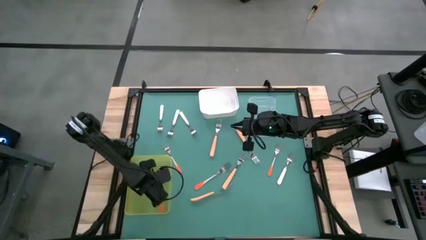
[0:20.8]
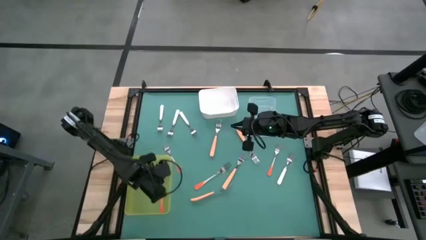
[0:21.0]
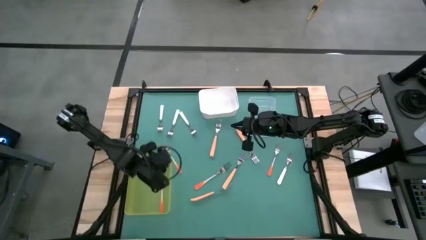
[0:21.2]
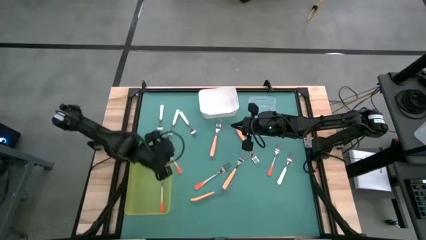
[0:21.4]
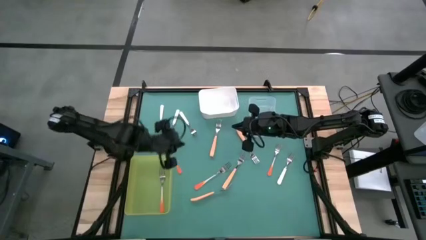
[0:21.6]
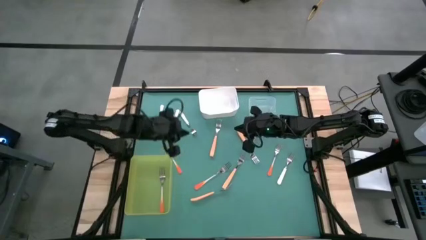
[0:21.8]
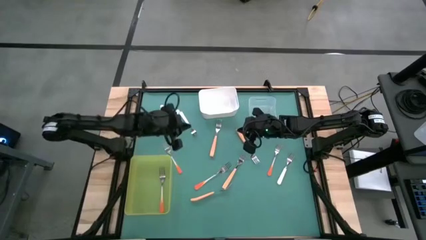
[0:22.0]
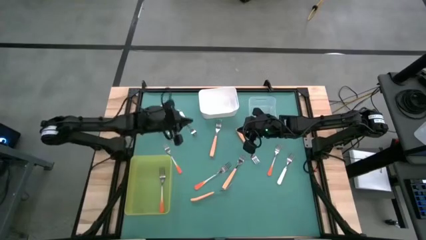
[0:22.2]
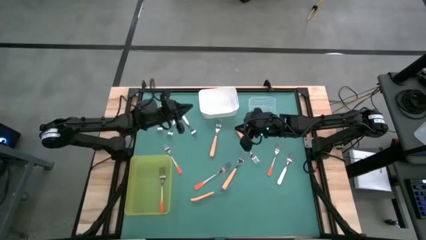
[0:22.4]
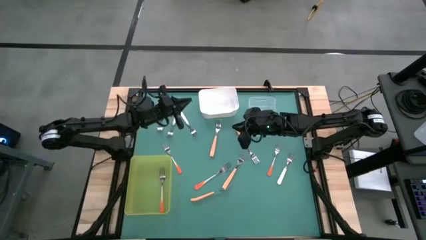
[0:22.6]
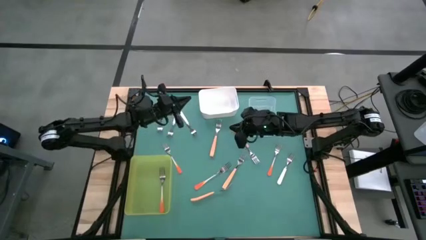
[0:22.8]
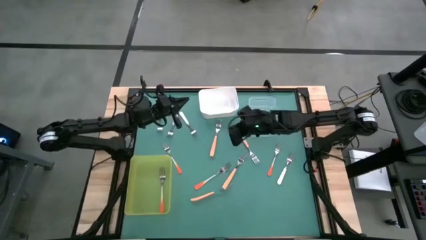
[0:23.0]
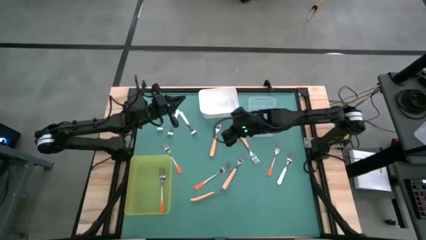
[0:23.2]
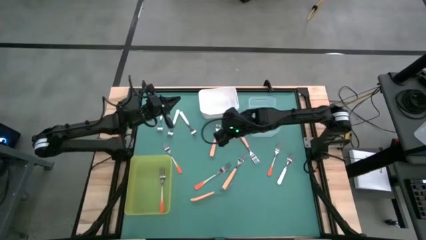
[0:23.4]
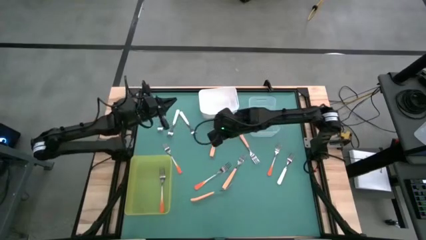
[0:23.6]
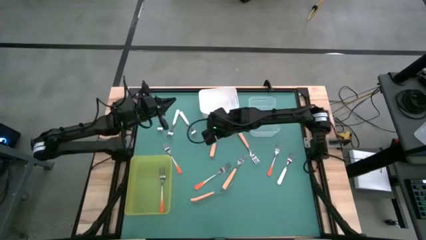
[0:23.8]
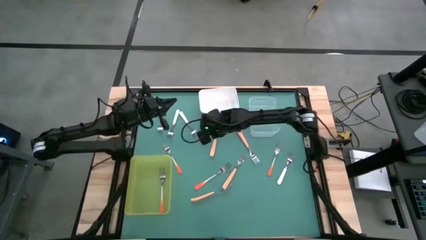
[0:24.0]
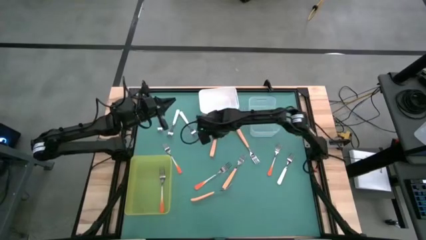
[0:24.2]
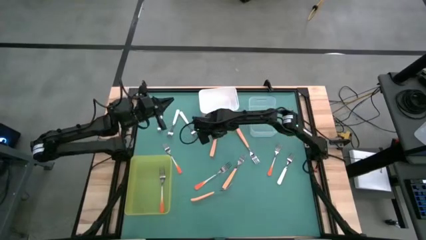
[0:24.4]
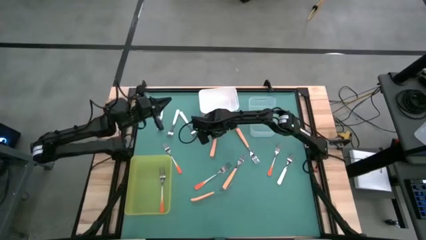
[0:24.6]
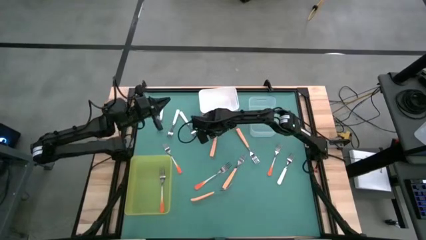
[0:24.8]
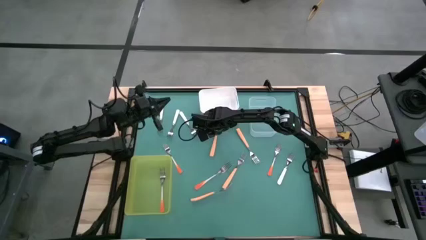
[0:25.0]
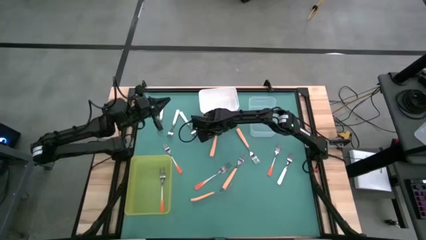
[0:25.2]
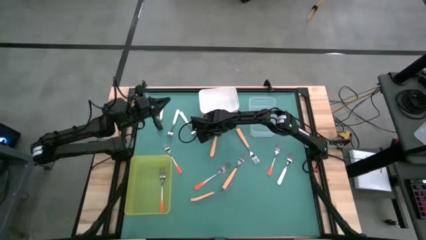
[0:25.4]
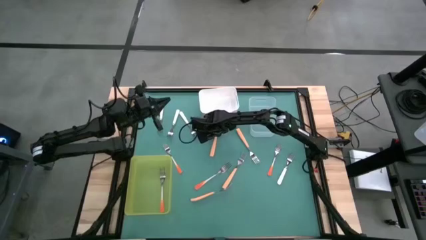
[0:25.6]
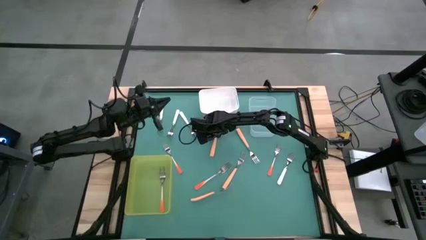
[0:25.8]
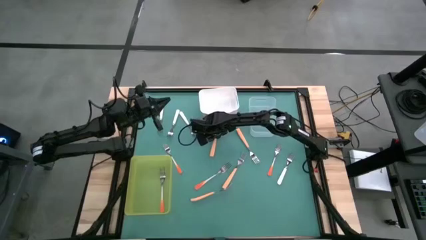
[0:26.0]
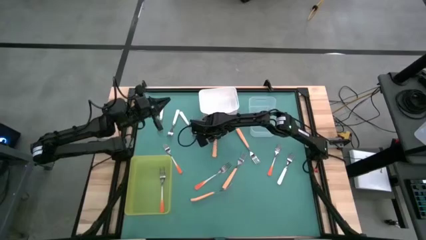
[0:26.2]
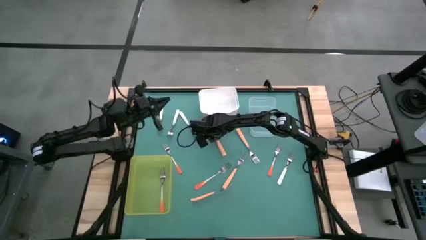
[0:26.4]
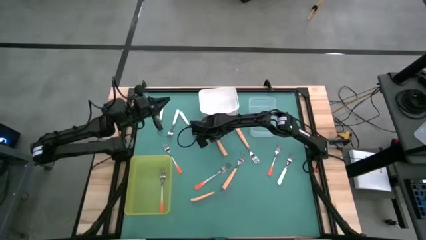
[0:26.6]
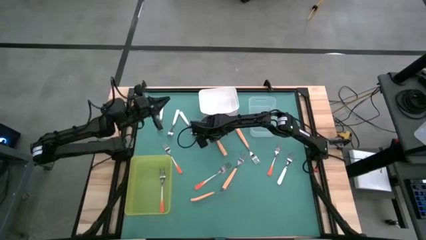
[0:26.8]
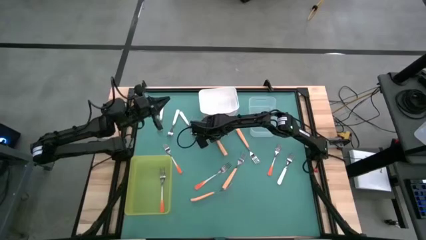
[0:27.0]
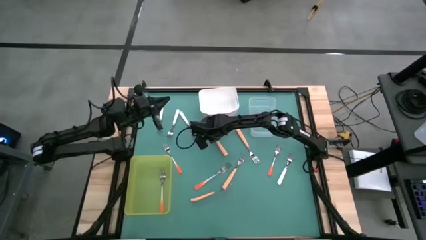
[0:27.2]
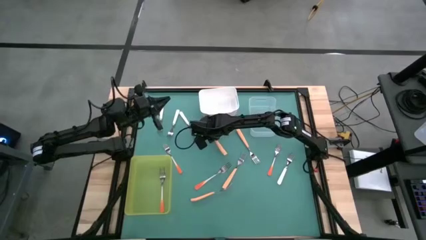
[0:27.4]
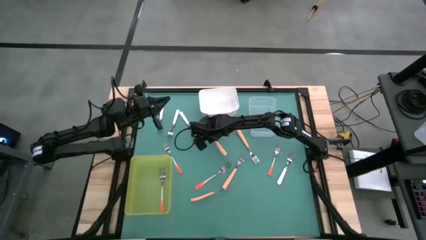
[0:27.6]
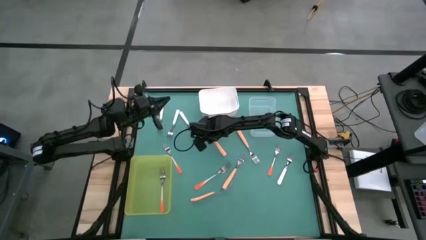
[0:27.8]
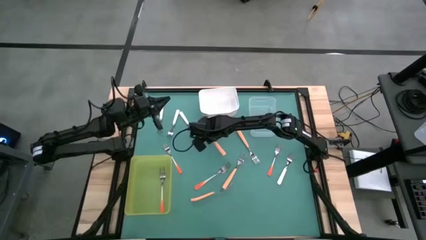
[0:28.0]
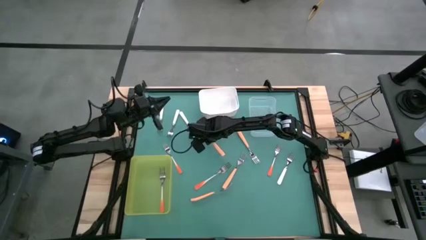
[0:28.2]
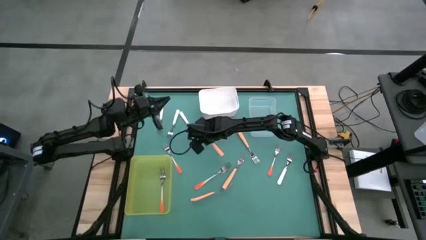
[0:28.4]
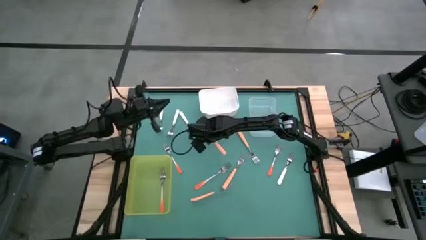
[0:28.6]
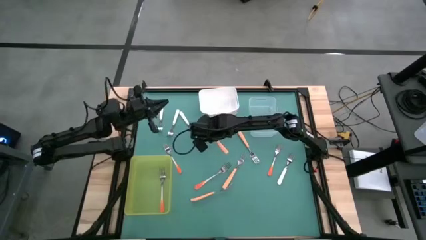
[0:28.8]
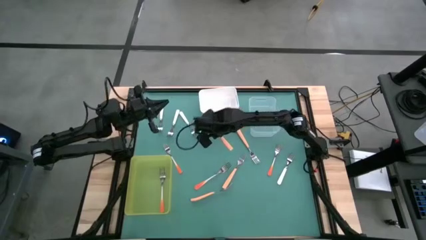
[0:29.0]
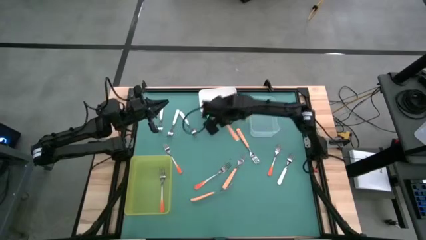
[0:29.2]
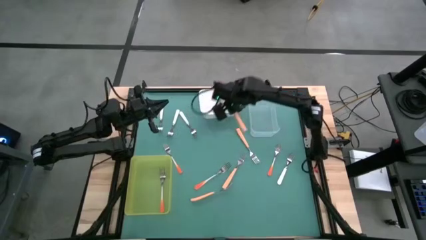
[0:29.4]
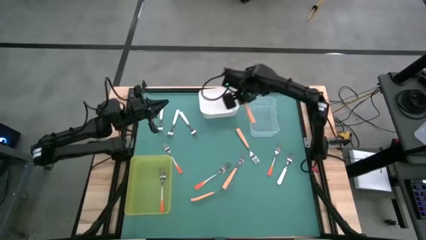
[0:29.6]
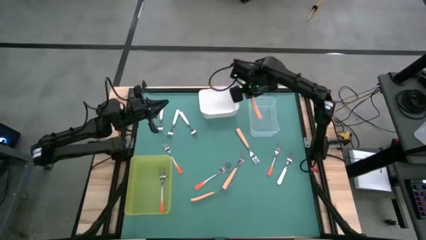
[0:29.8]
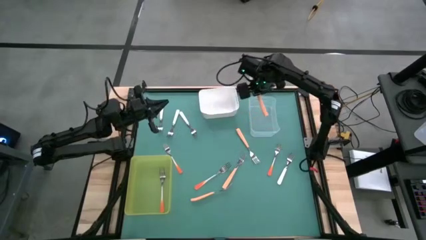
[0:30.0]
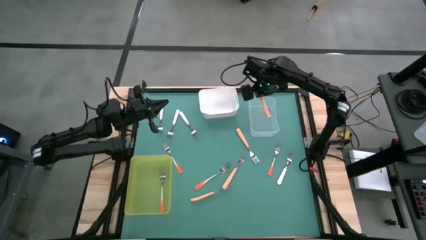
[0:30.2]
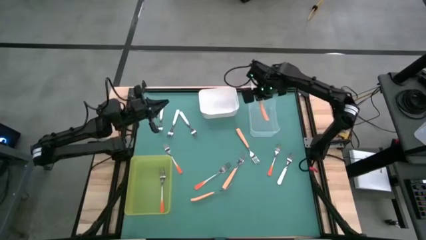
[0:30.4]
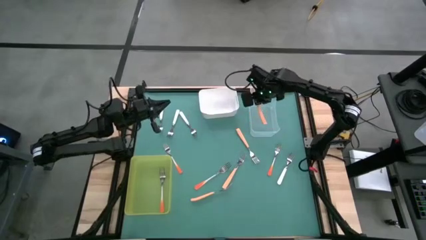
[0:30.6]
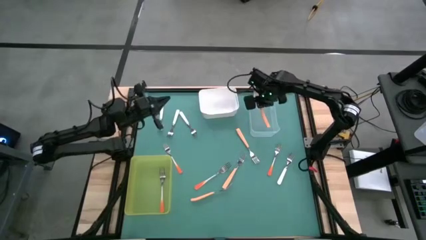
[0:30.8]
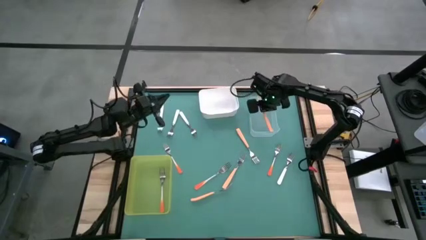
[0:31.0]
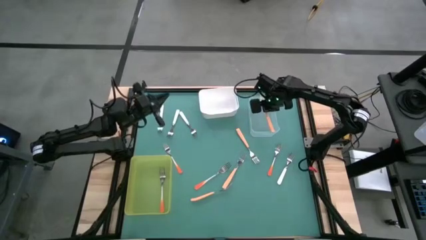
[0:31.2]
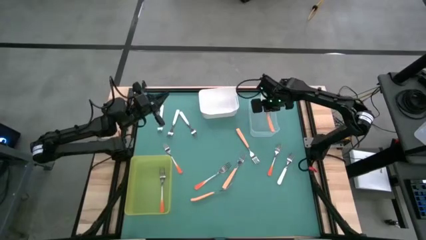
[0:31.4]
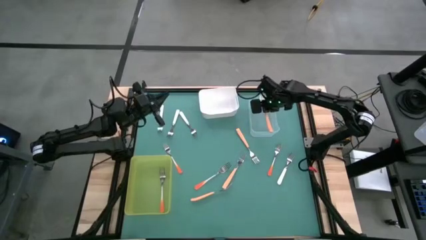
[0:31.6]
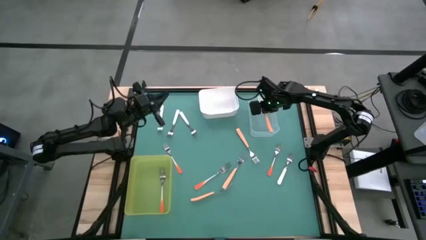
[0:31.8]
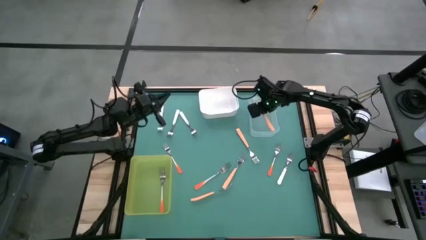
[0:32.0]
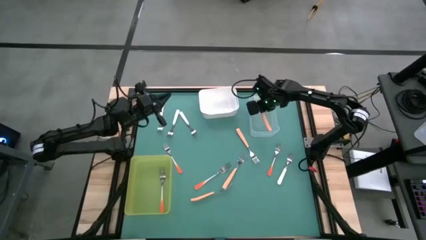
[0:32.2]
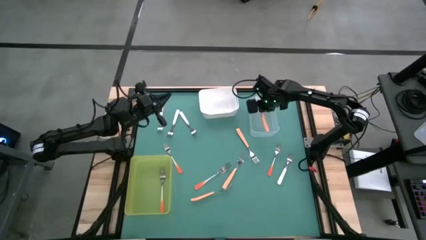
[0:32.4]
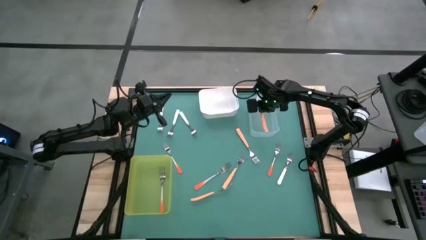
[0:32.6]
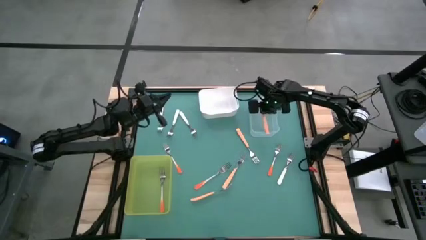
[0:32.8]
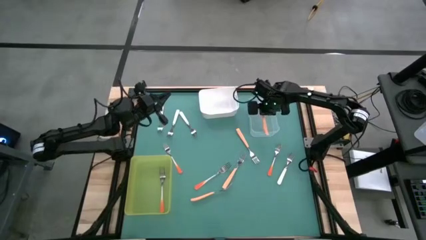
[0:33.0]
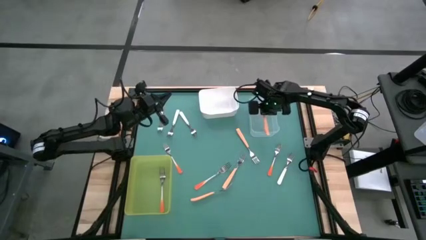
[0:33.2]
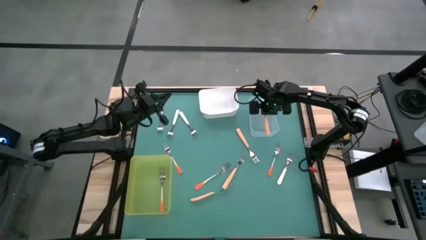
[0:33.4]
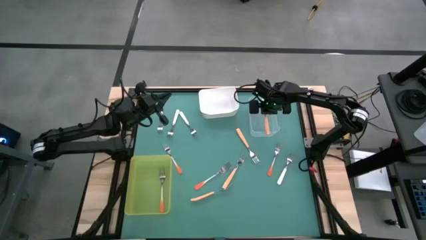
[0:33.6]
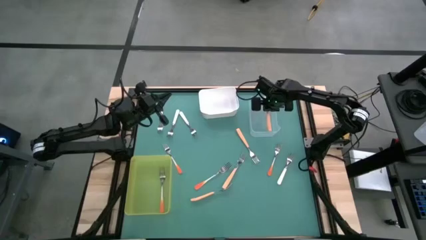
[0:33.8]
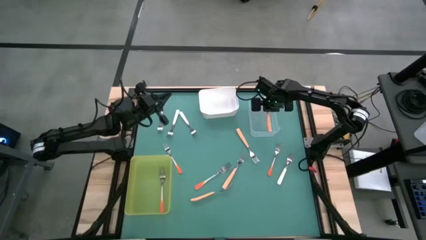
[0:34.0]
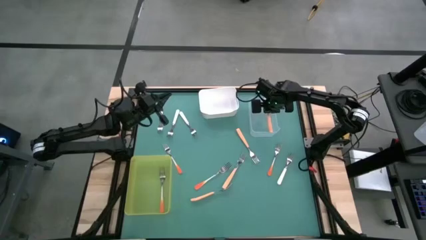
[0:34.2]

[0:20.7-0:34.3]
Task: Sort silverware by color (type)
Put the light orange fork into the transparent bin
